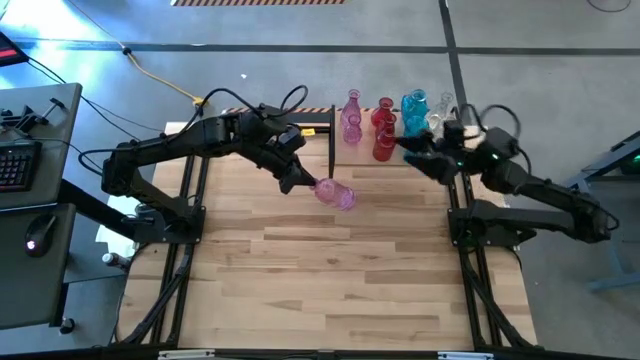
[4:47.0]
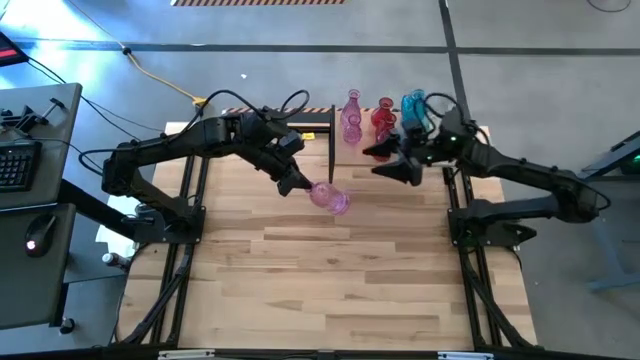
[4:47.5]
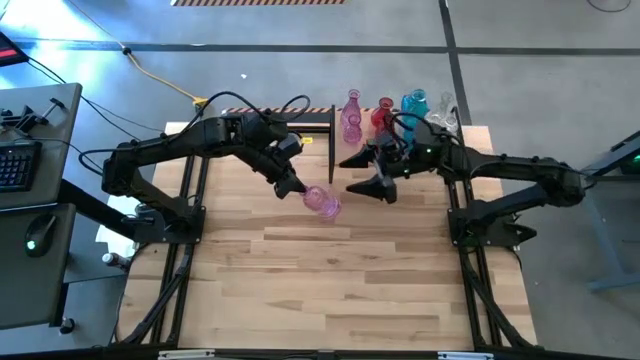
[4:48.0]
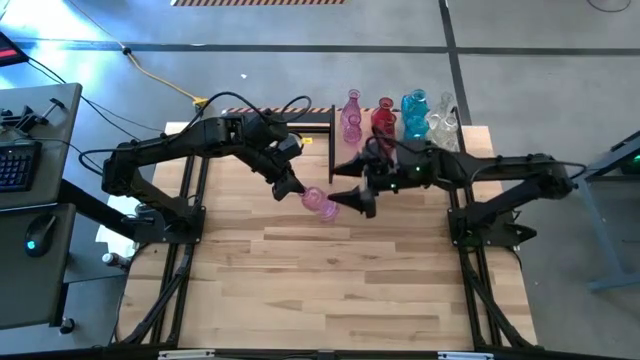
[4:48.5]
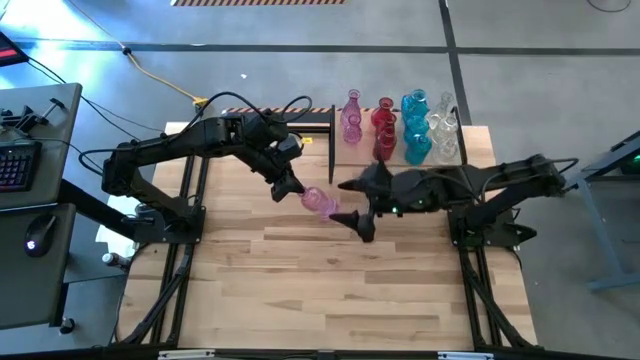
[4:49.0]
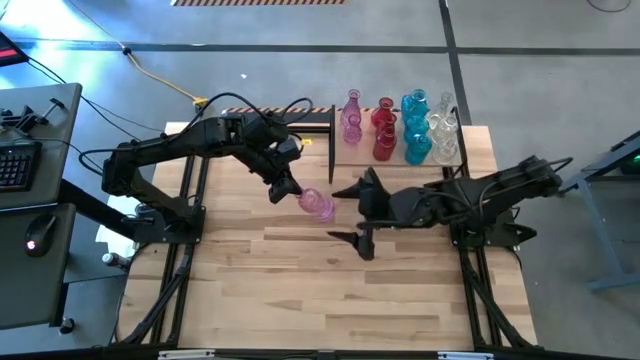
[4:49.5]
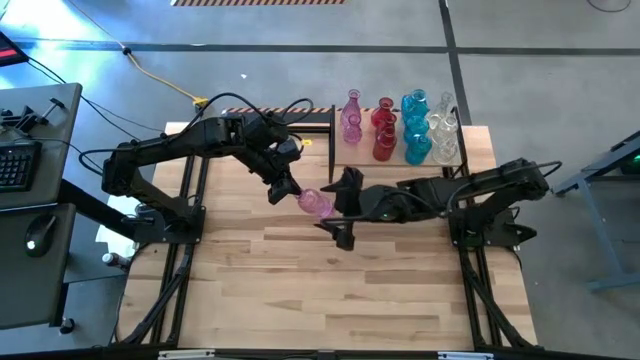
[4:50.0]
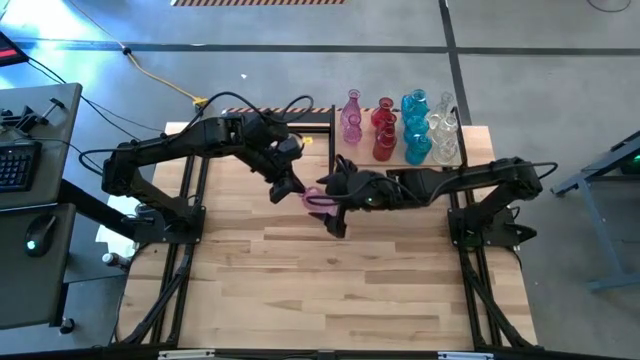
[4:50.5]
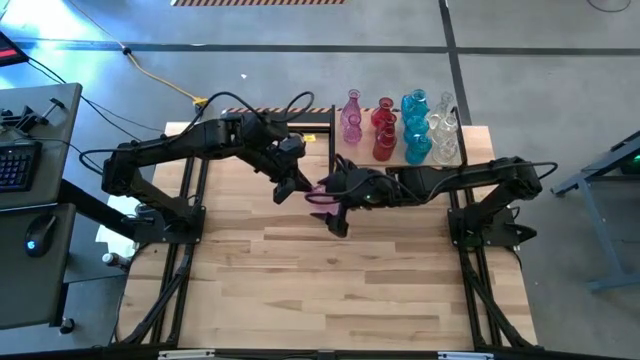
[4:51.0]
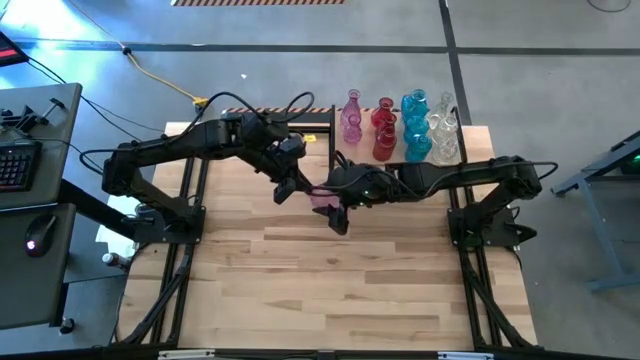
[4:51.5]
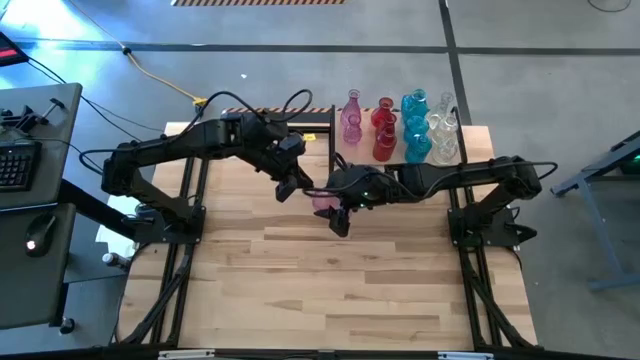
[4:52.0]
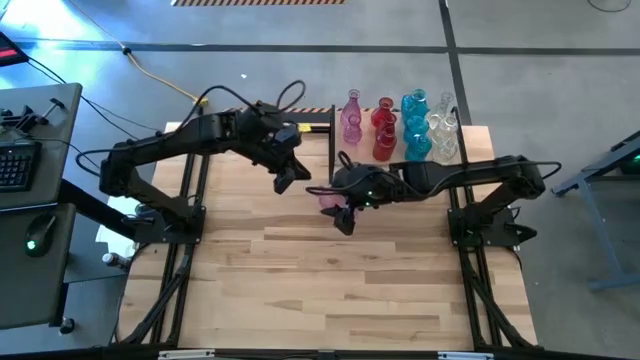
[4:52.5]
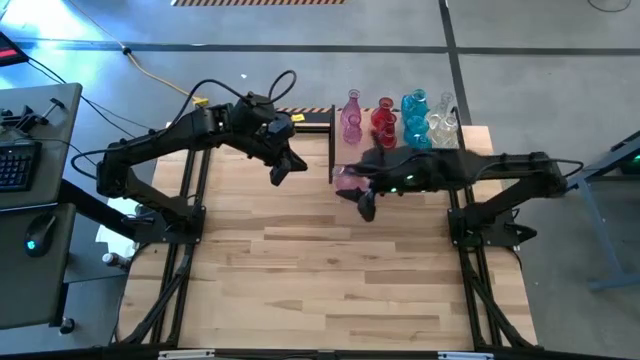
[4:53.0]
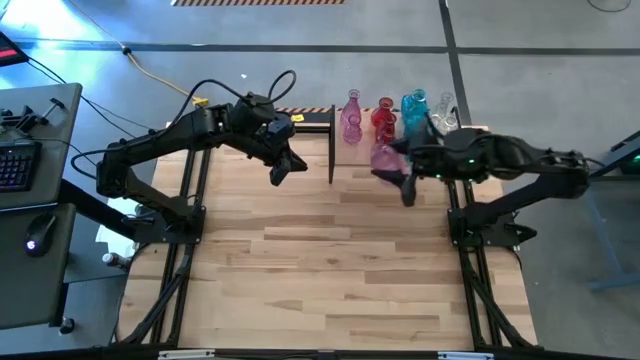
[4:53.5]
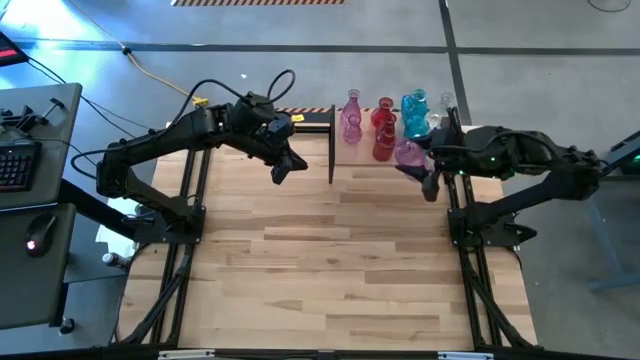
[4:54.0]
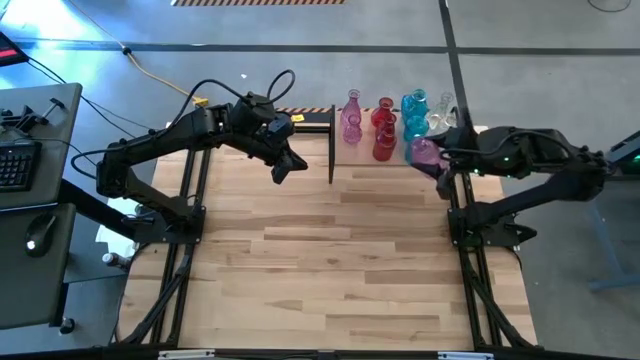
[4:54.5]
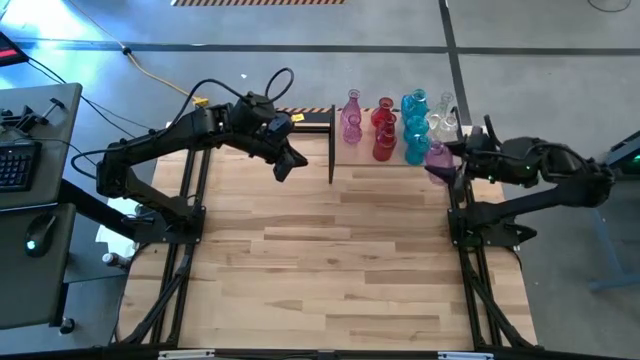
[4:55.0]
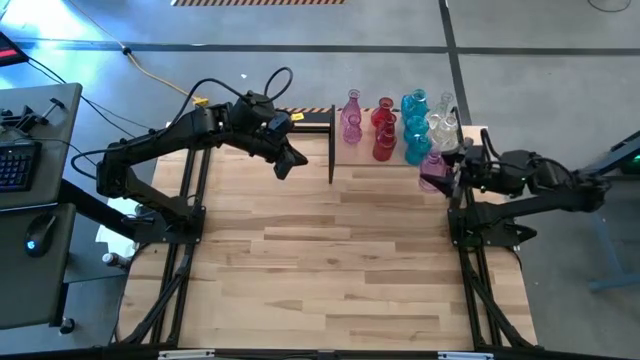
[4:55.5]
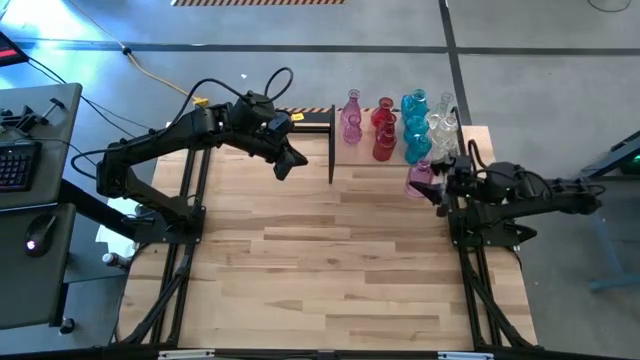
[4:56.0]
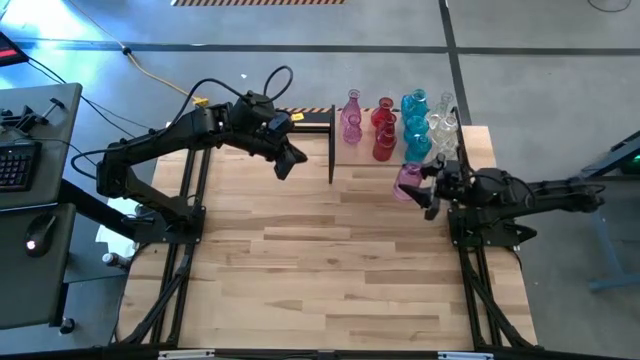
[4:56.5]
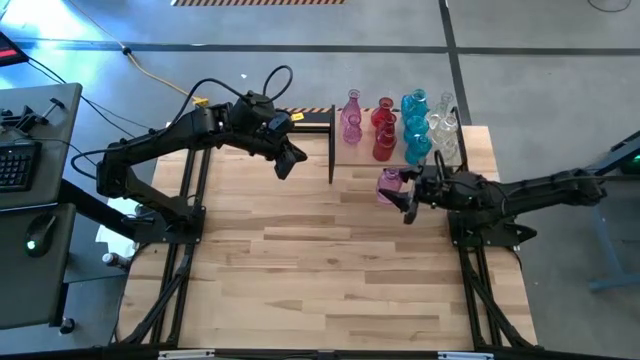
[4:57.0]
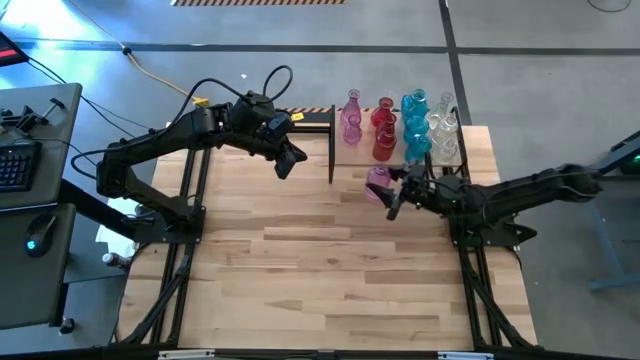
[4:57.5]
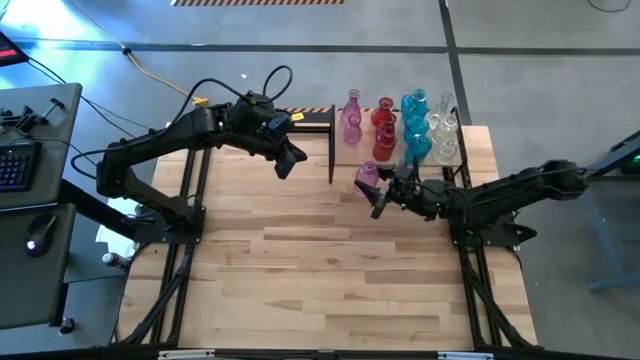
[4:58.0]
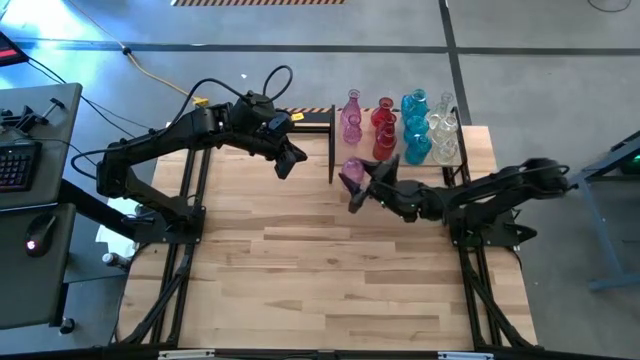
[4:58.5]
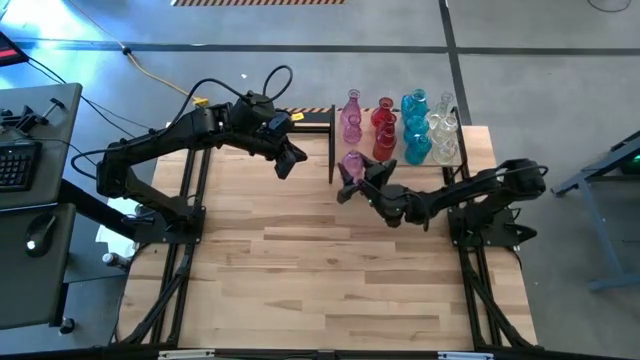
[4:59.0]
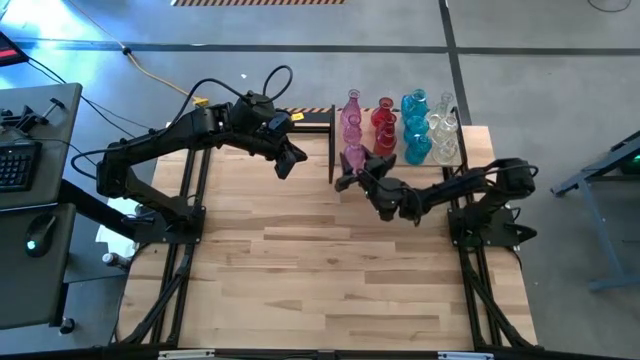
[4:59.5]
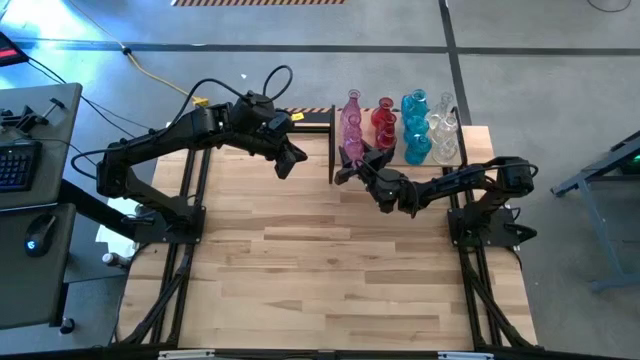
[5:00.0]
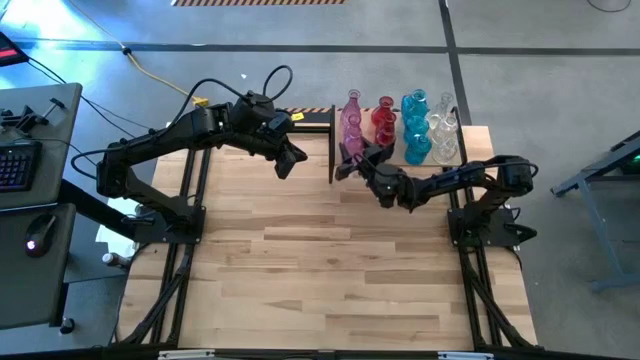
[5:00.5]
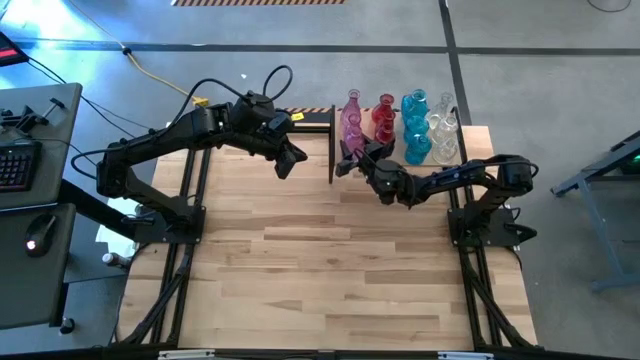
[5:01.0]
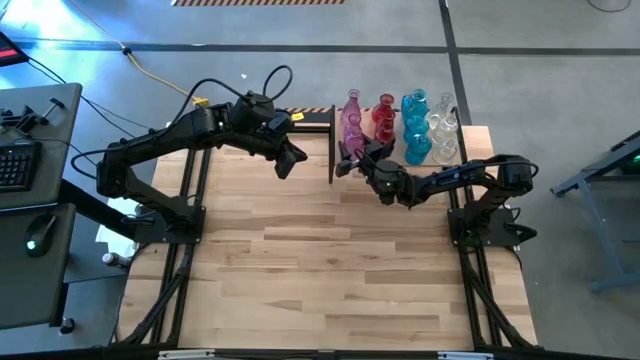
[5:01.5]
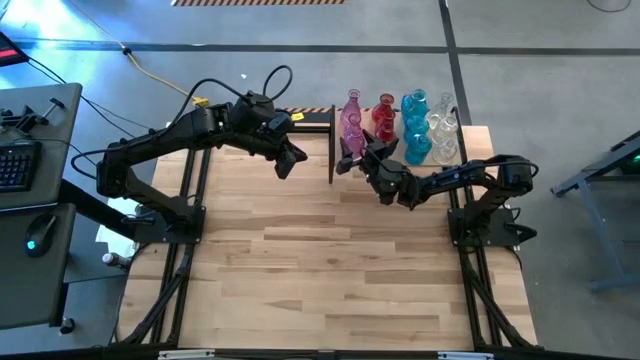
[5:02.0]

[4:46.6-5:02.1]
Task: sort vases onto shelf
Put the pink vase on the shelf aligned with the pink vases

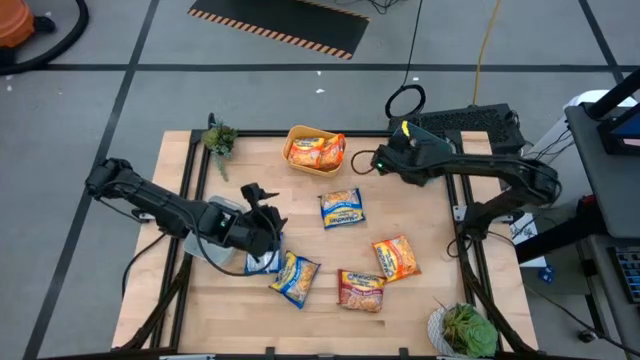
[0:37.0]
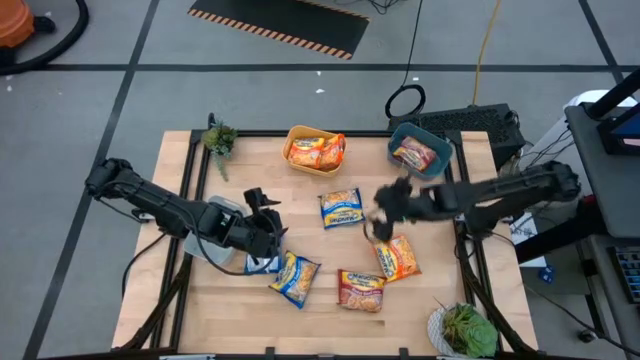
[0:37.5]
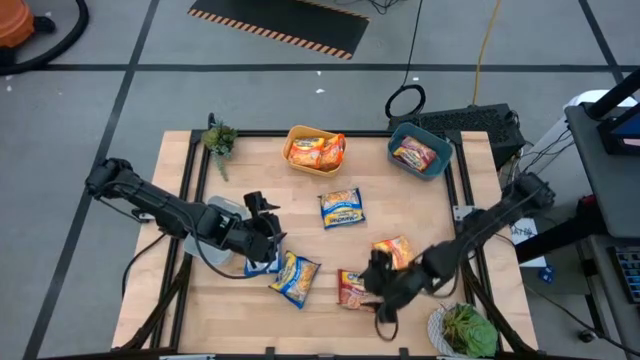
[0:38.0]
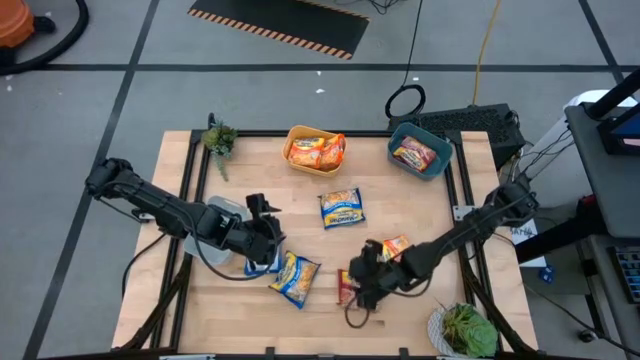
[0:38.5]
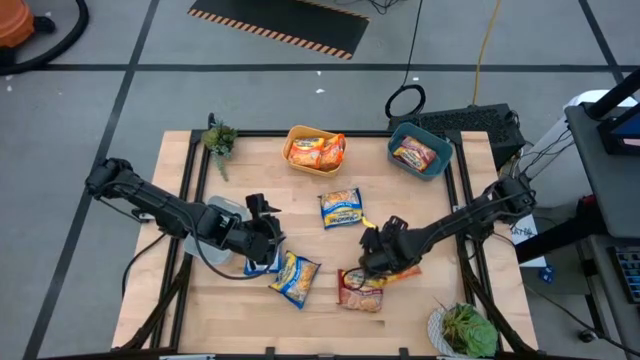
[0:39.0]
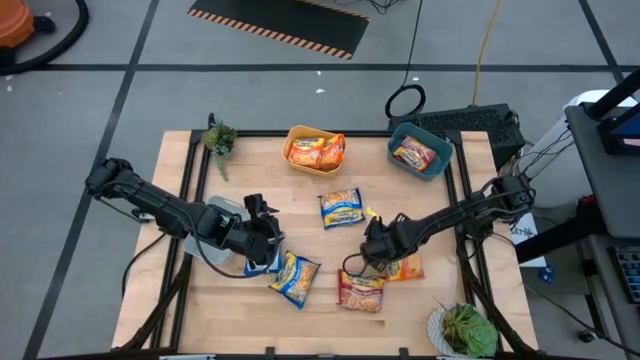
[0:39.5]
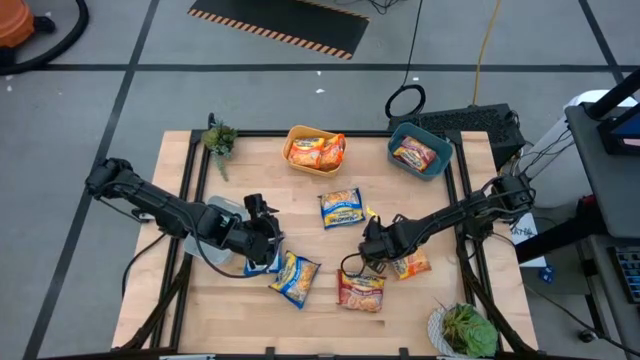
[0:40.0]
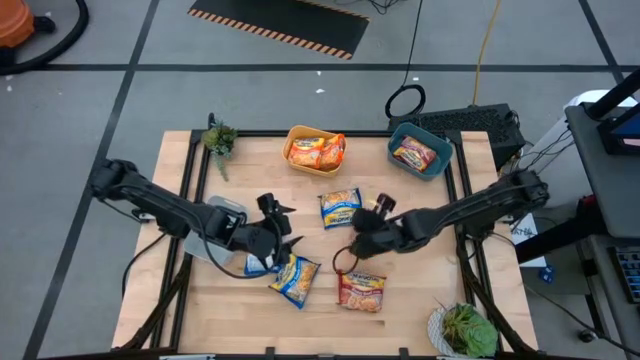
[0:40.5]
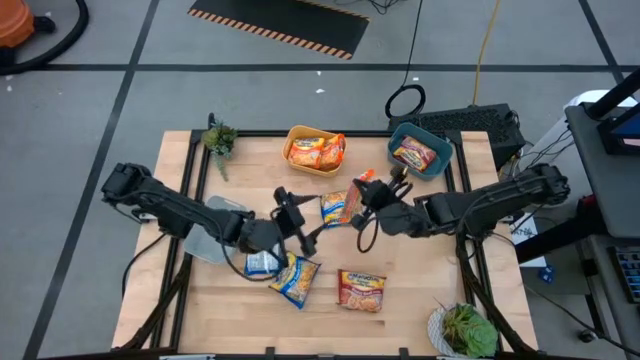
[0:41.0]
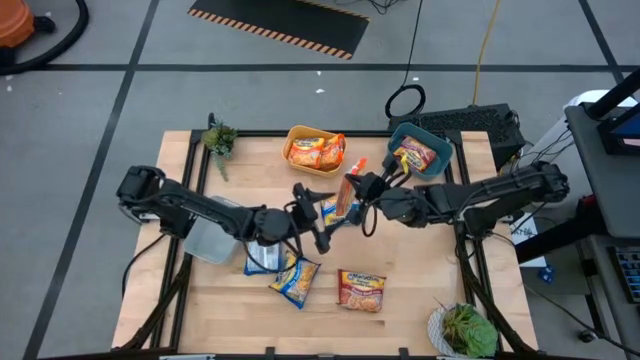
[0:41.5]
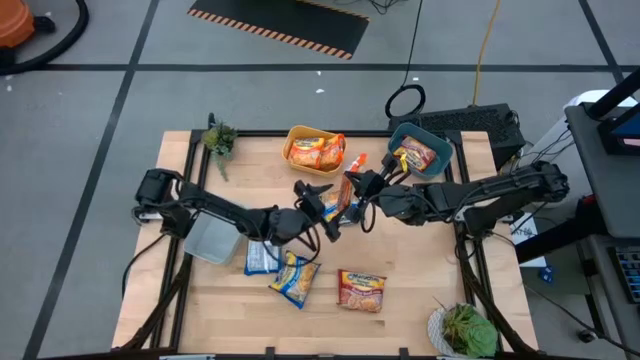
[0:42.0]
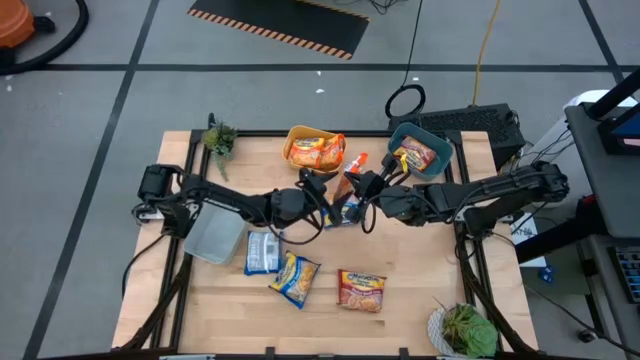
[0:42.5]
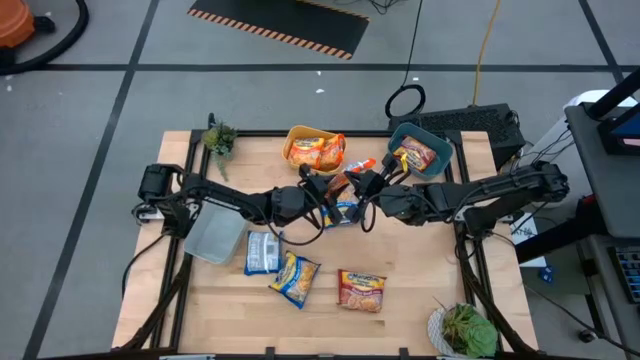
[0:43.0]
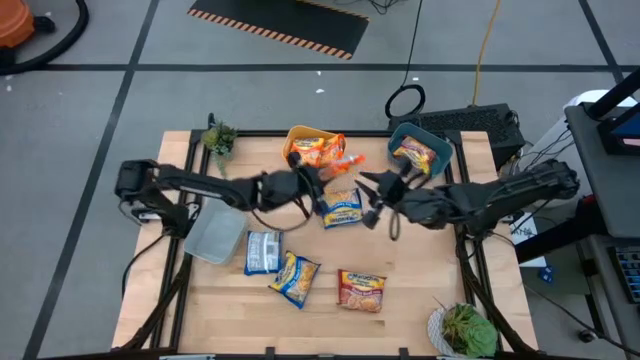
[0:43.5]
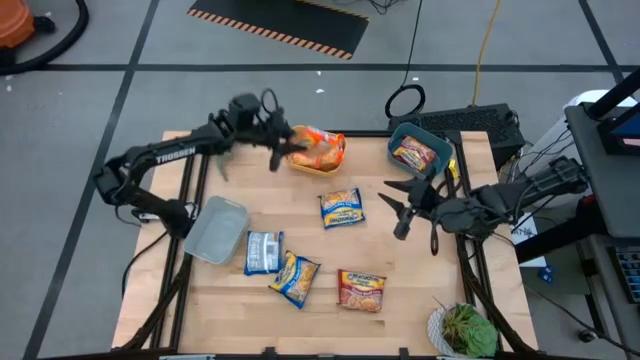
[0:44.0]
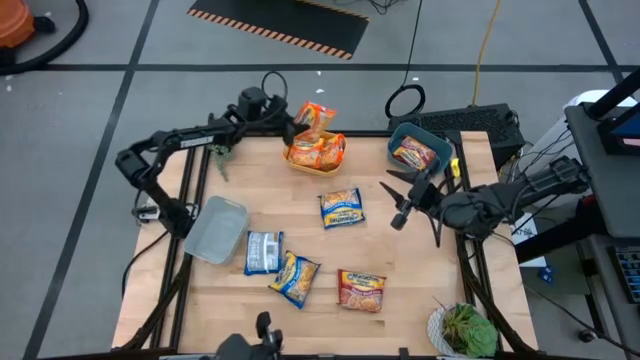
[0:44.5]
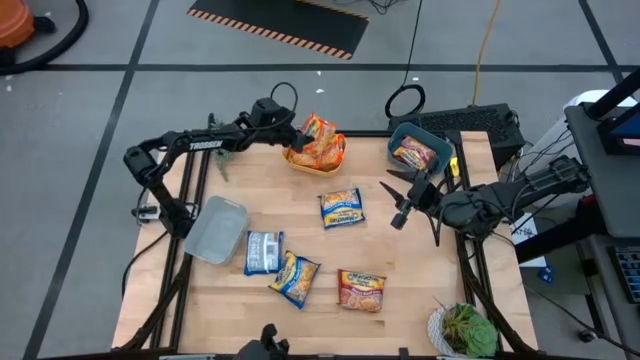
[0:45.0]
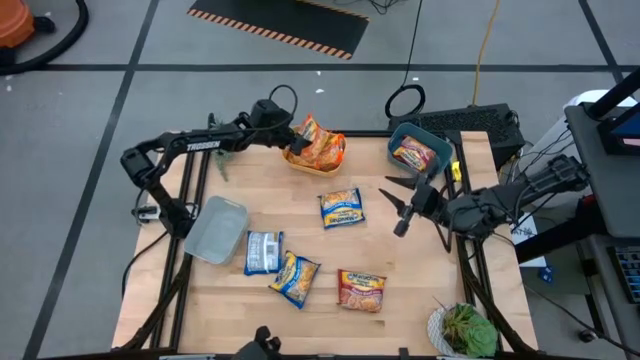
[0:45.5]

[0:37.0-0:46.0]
Task: Sort Maruchan noodles
Put the orange bag into the yellow bin
